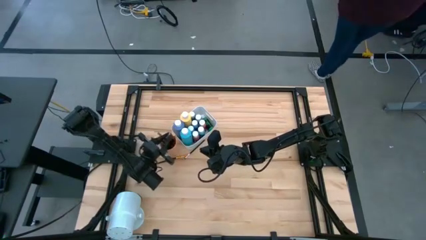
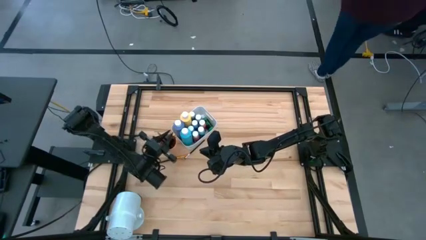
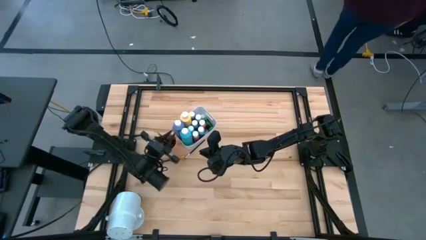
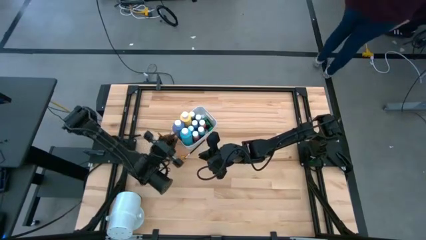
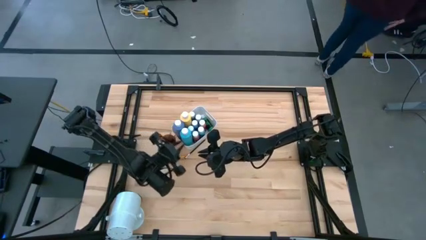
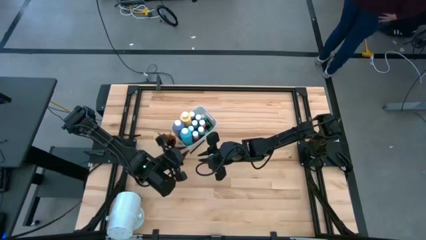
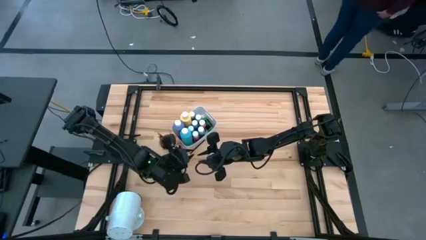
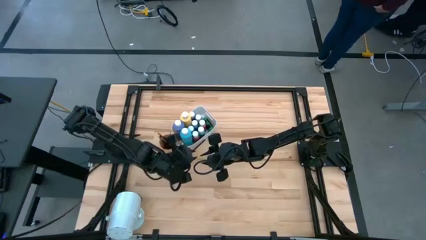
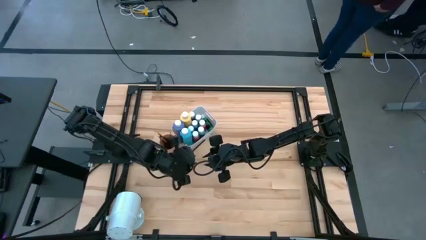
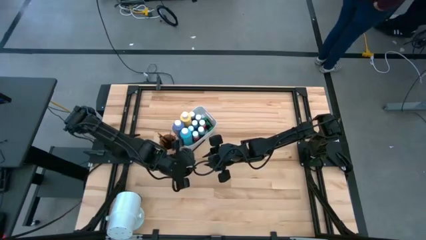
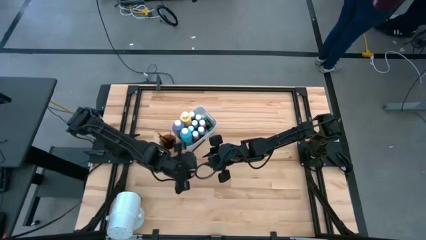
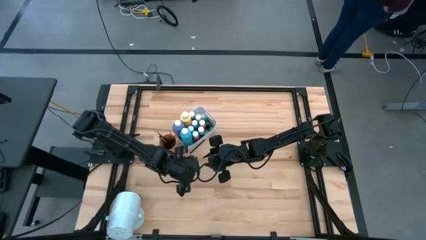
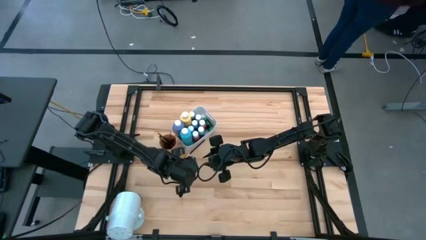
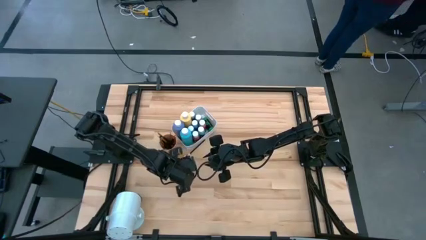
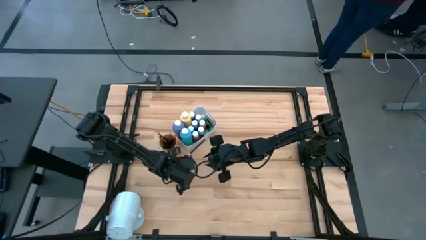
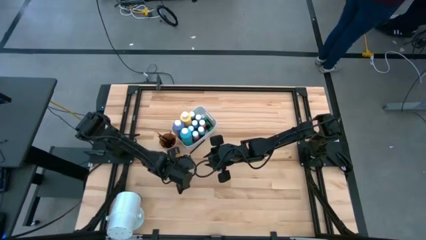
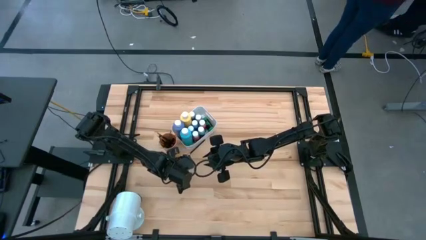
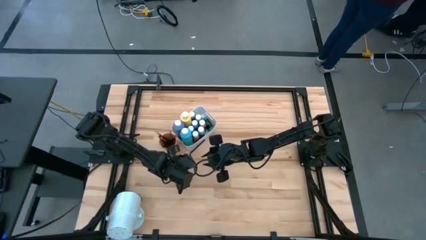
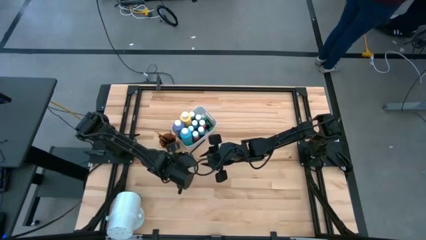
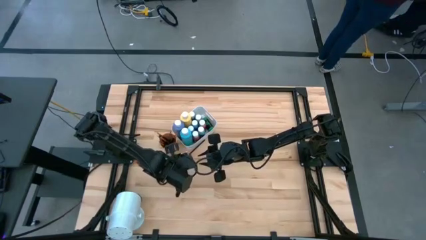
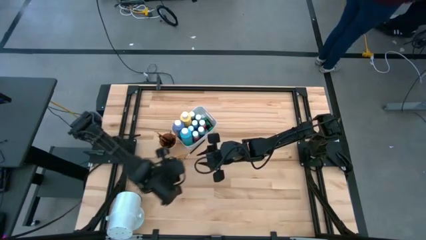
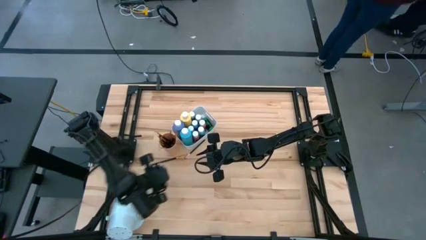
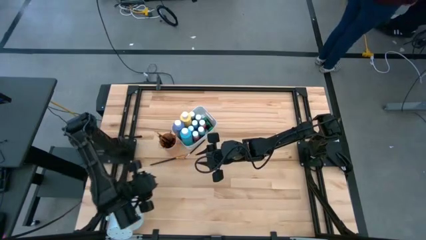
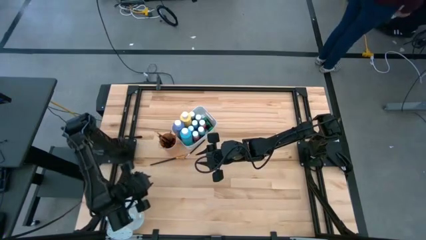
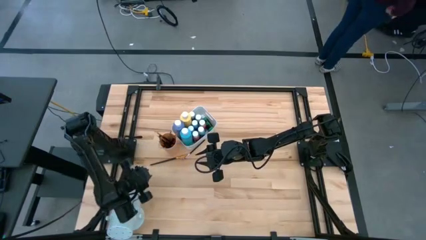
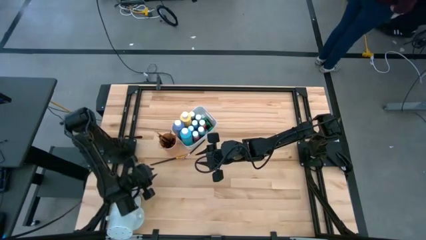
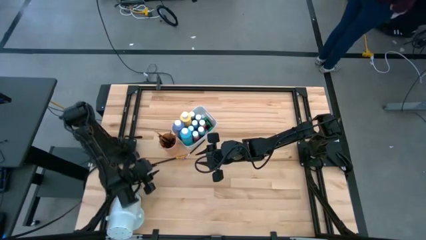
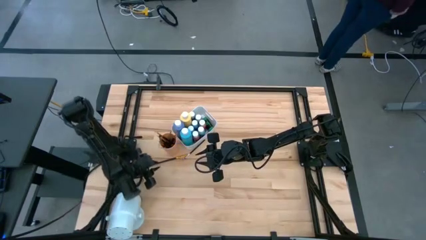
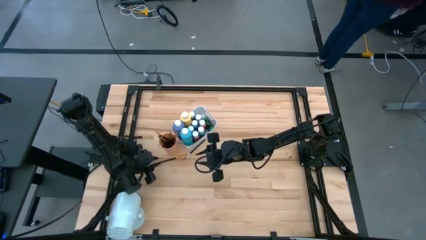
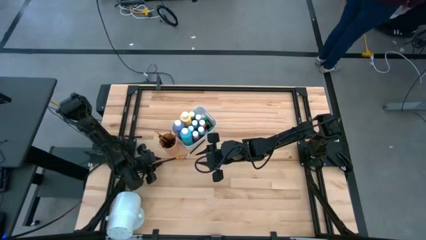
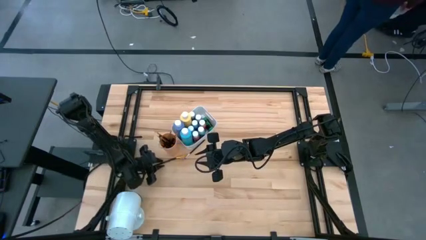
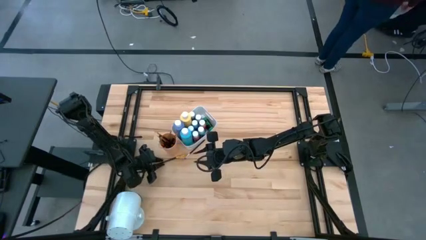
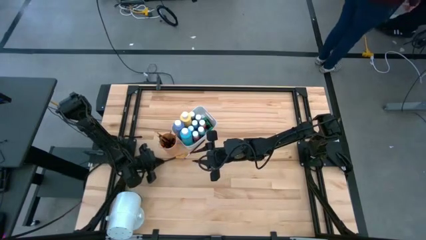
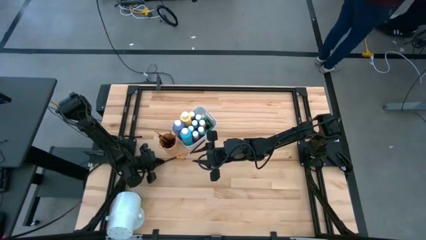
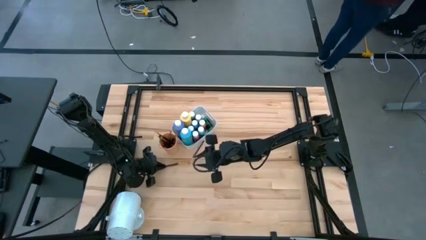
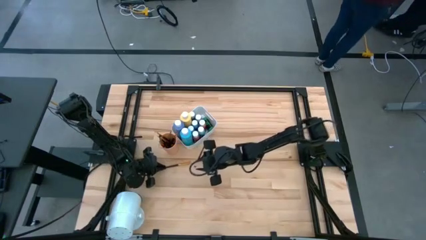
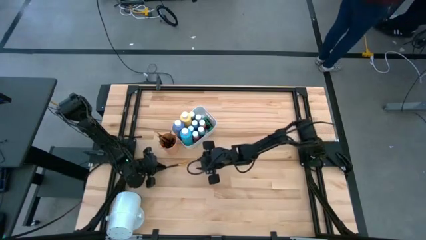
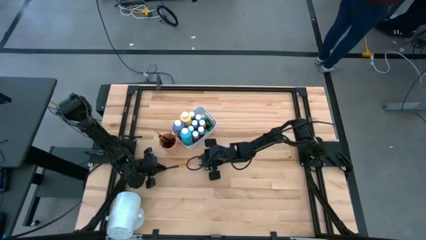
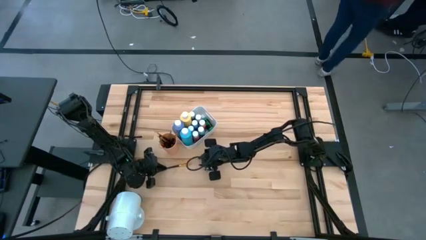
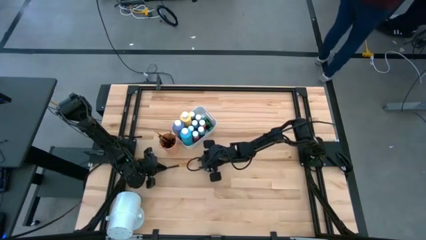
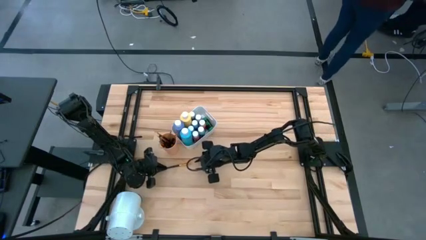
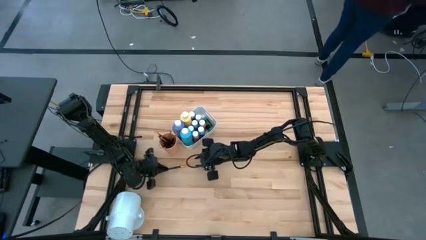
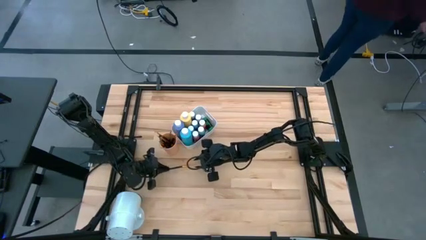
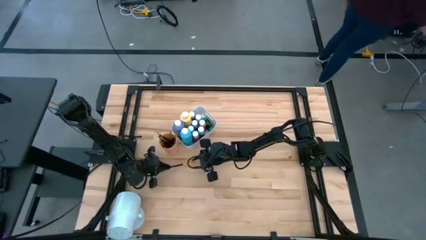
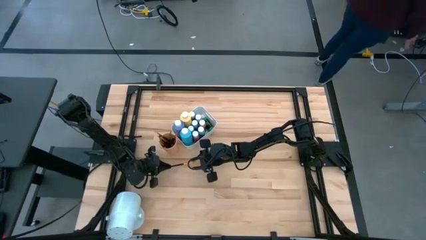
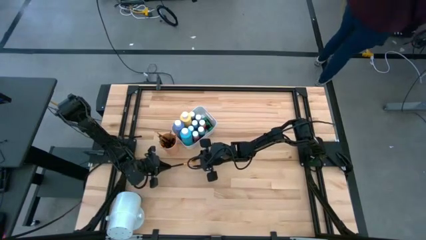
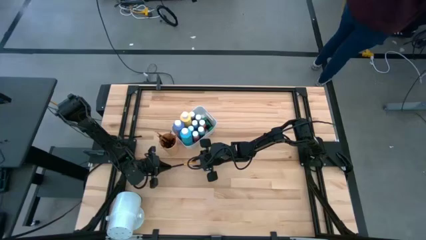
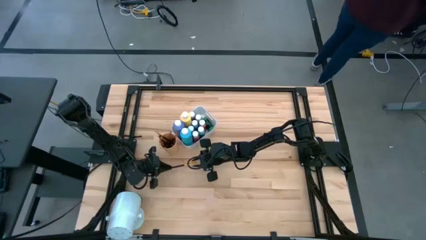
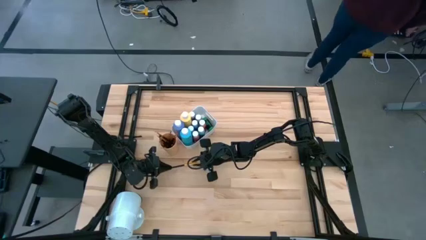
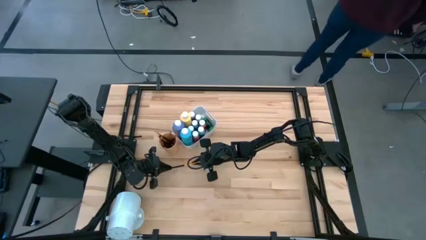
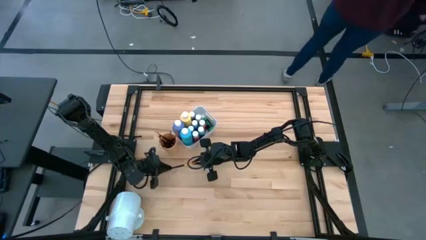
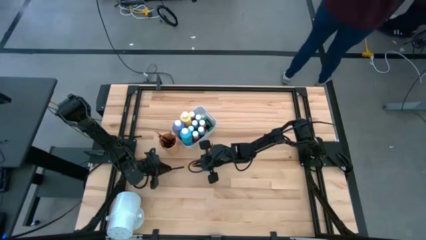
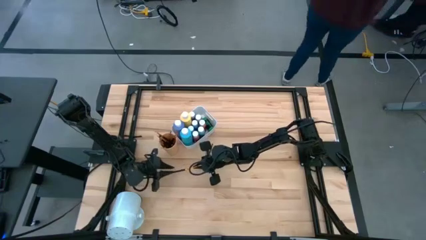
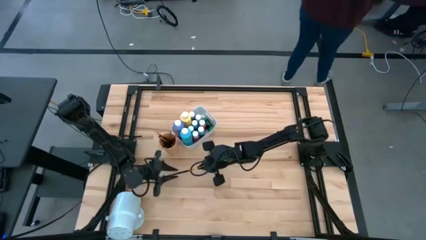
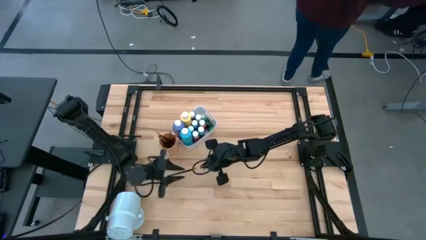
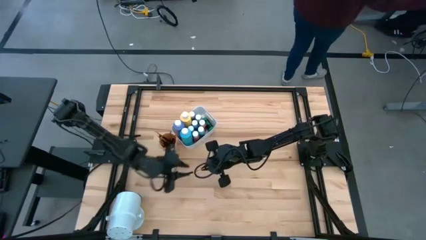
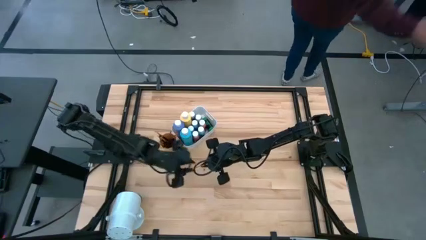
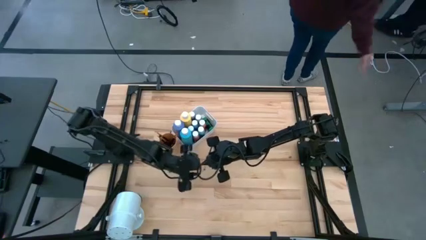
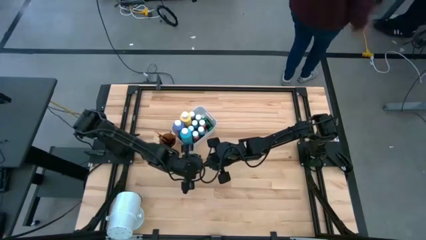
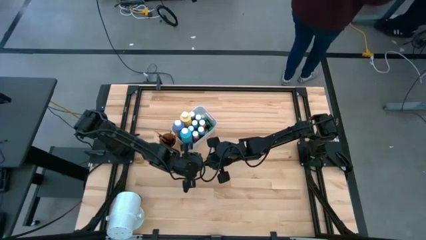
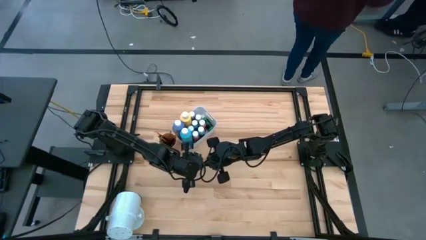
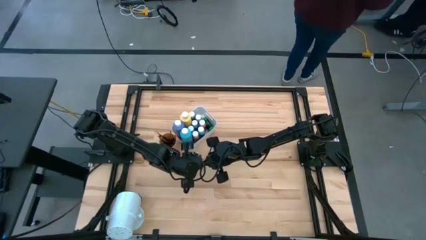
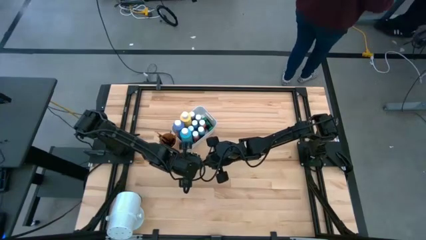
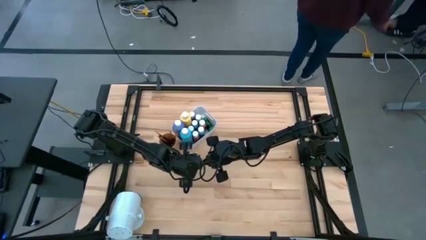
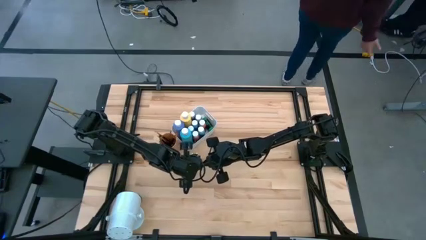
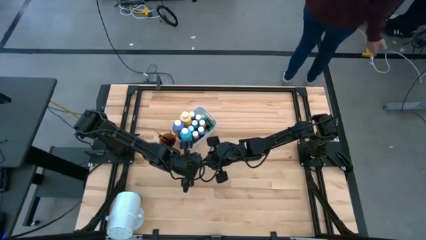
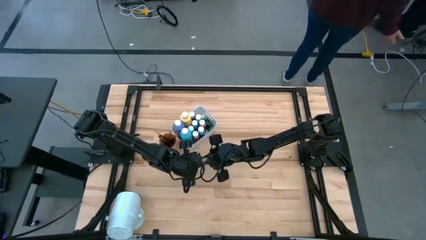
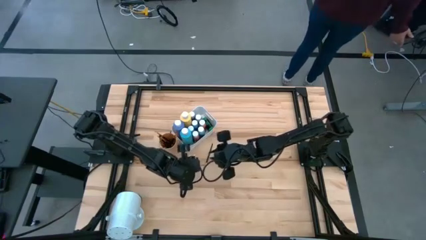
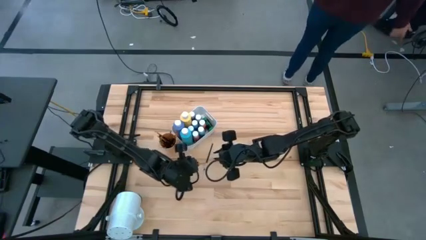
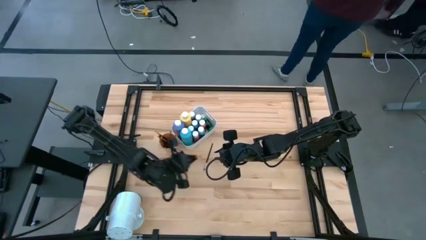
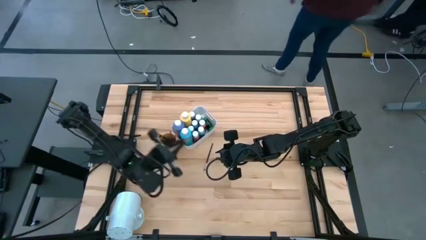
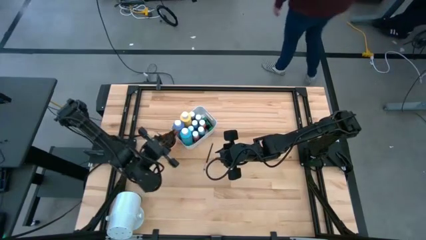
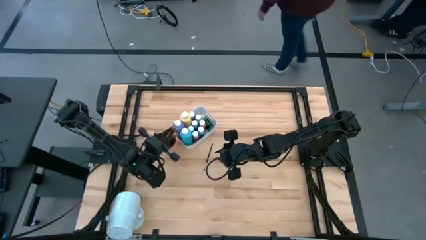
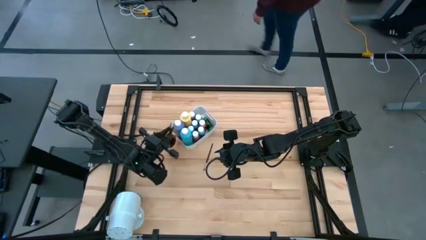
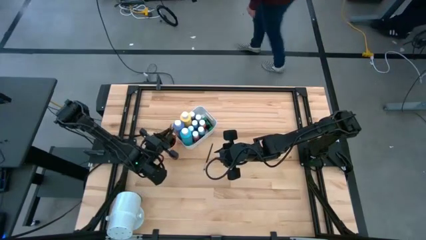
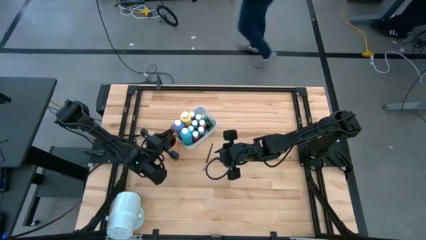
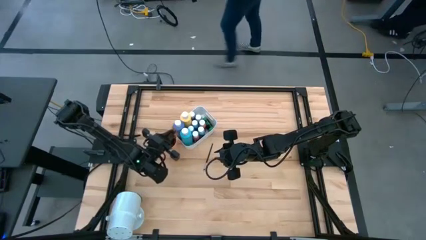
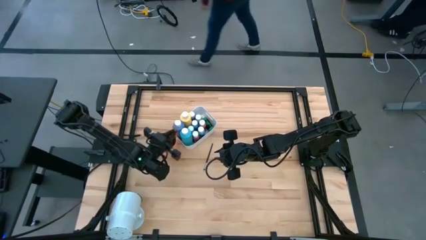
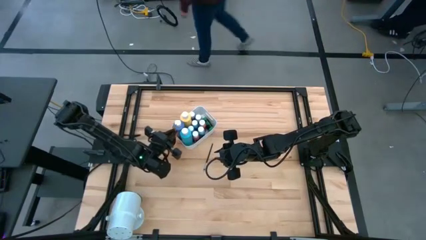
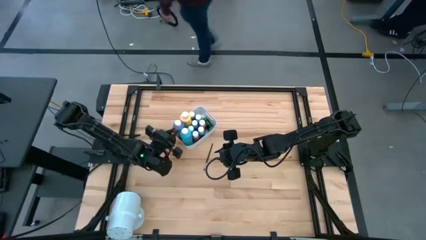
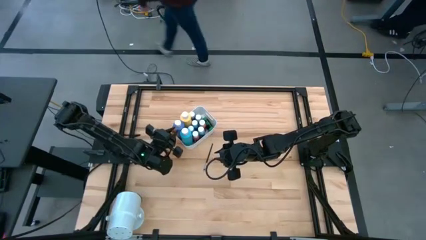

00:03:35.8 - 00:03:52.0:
Task: Pick & Place Paint Supplies
Put the black gold paintbrush into the orange cup

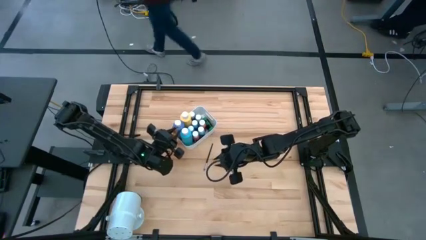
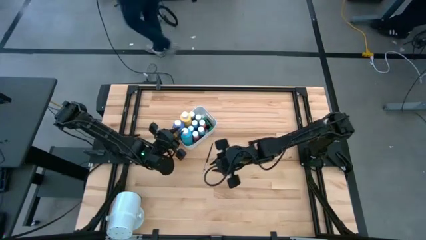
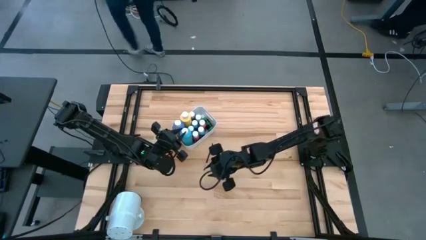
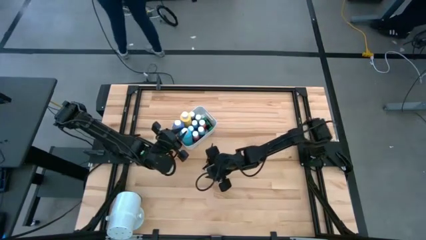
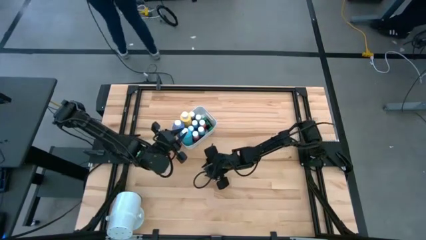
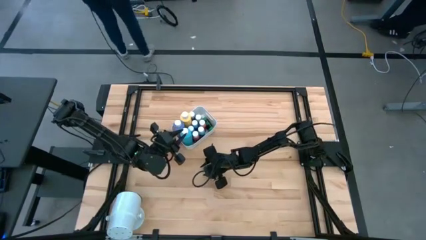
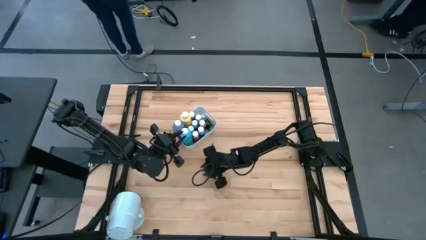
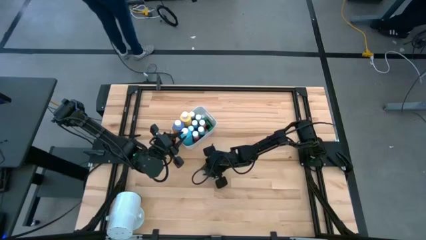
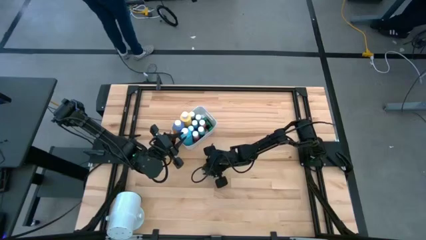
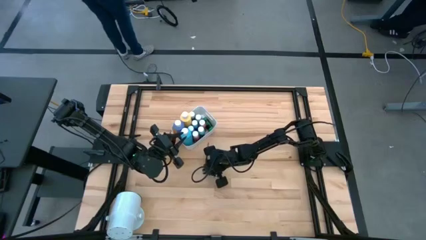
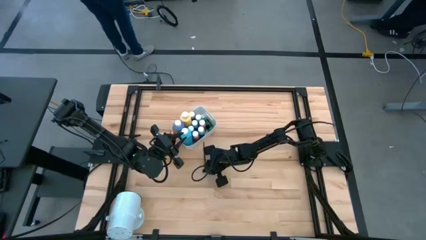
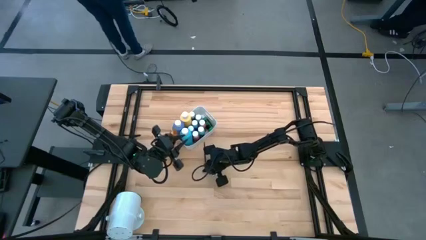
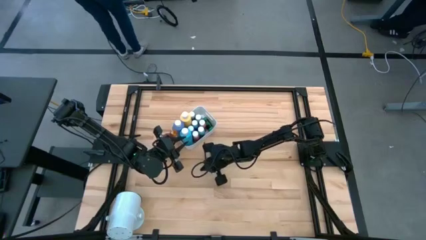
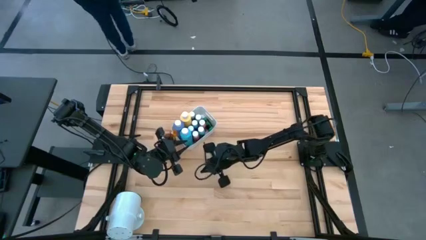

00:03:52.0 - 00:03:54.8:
Put the black silver paintbrush into the orange cup
